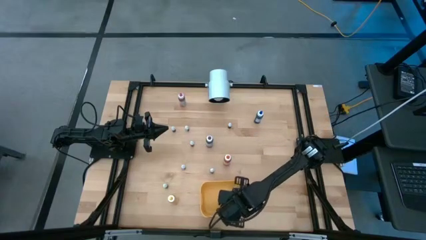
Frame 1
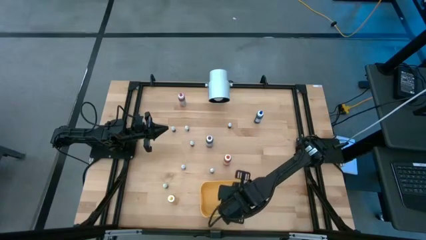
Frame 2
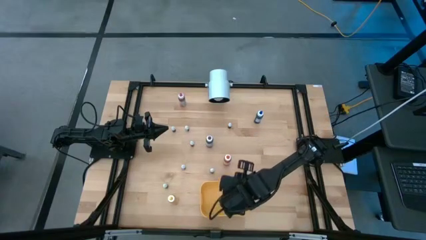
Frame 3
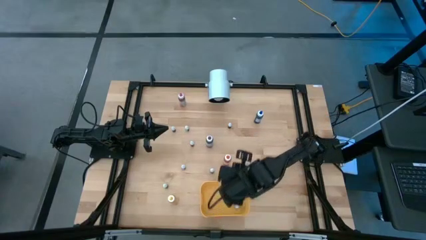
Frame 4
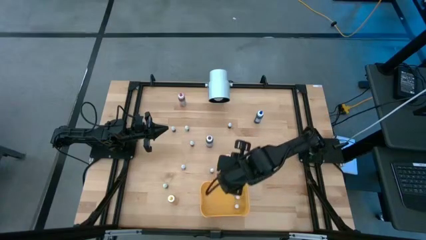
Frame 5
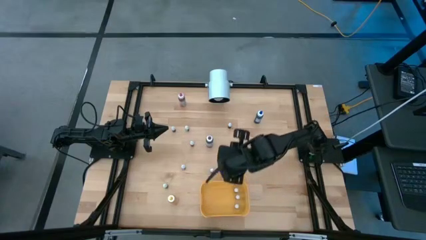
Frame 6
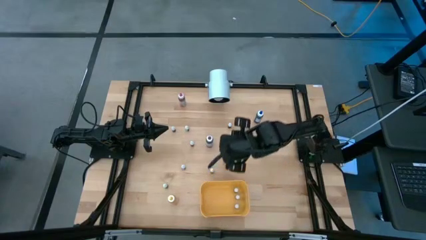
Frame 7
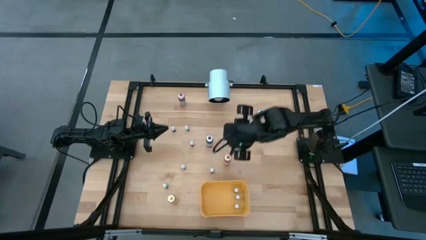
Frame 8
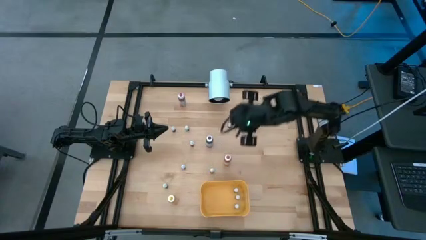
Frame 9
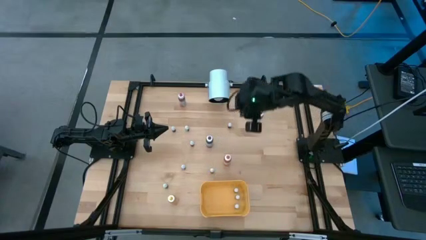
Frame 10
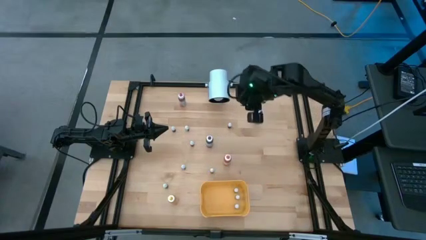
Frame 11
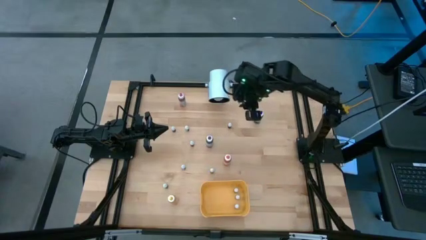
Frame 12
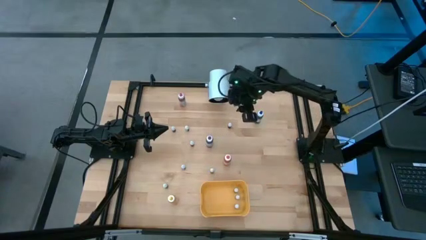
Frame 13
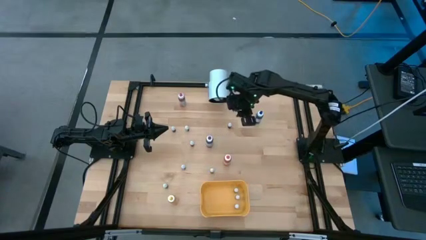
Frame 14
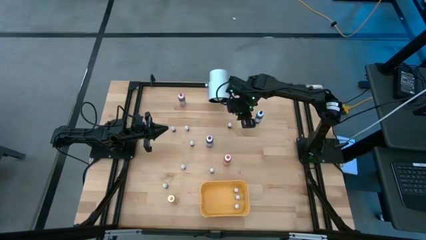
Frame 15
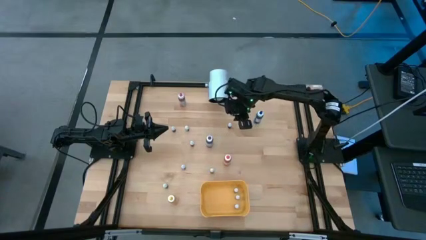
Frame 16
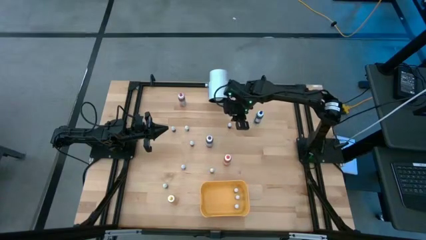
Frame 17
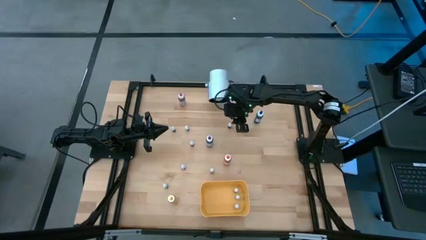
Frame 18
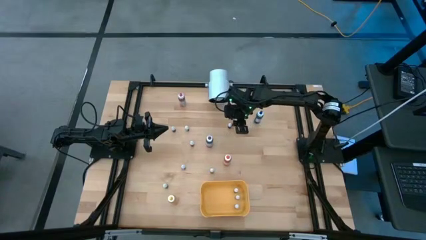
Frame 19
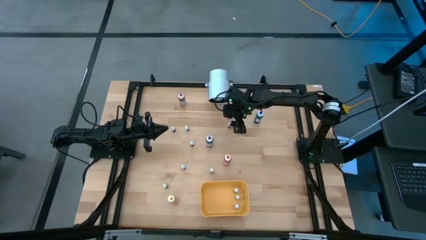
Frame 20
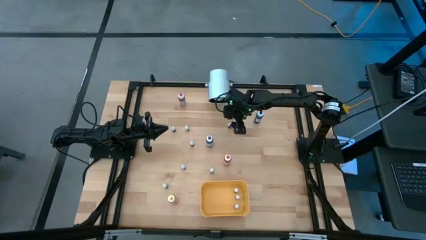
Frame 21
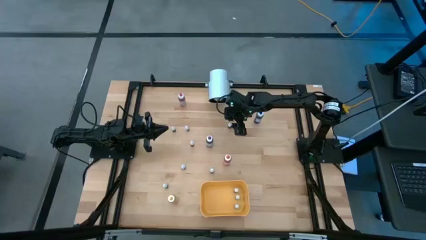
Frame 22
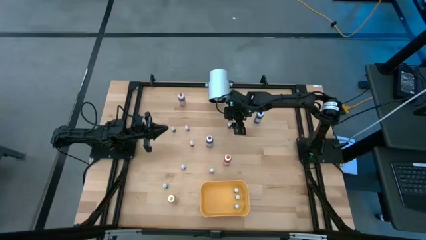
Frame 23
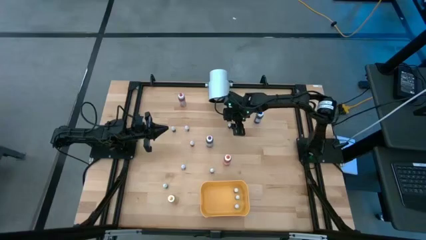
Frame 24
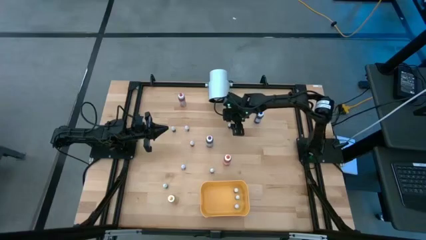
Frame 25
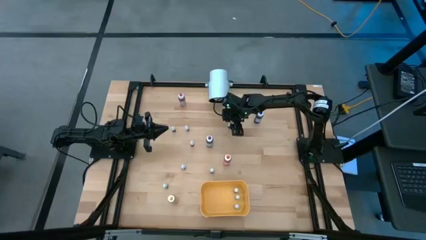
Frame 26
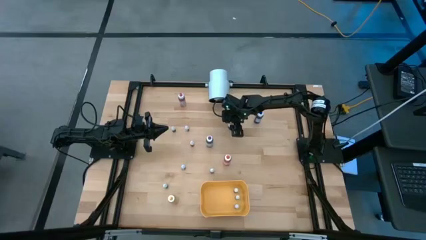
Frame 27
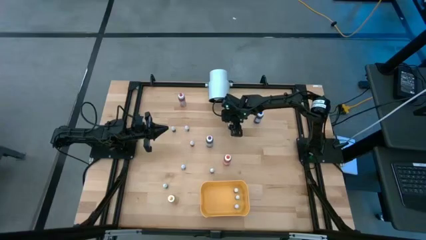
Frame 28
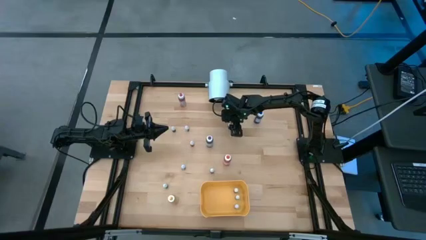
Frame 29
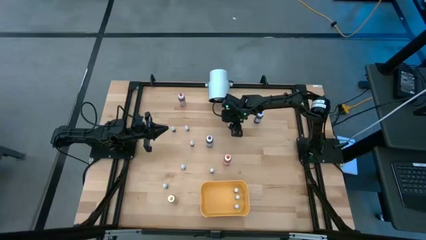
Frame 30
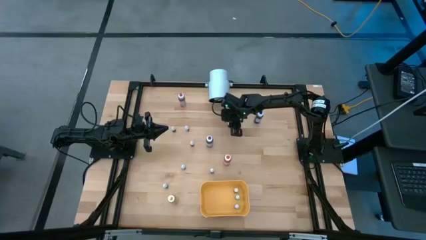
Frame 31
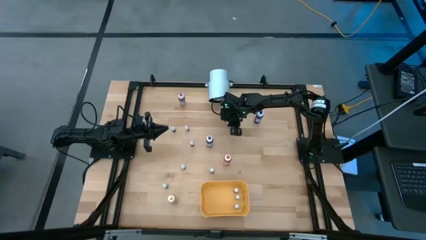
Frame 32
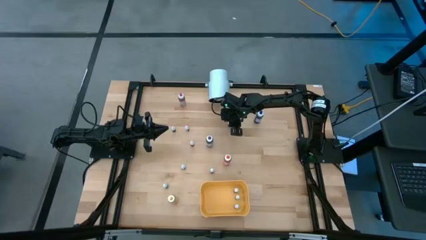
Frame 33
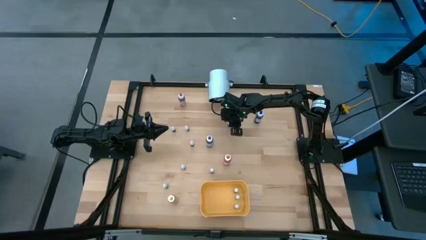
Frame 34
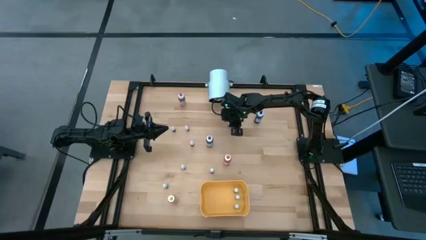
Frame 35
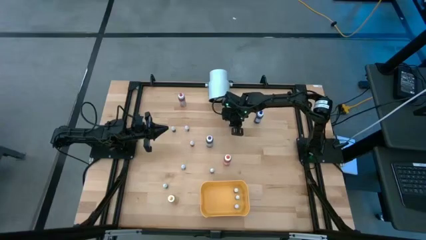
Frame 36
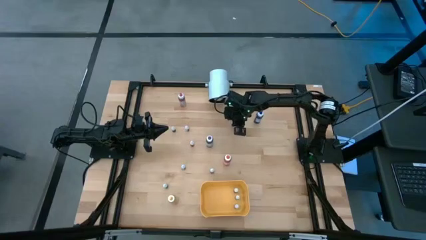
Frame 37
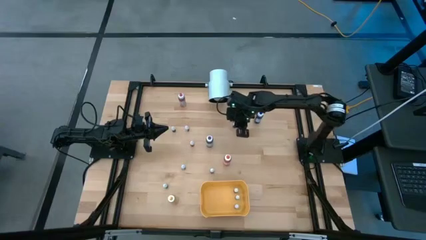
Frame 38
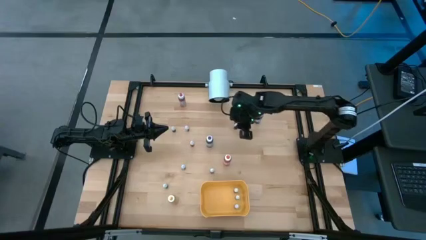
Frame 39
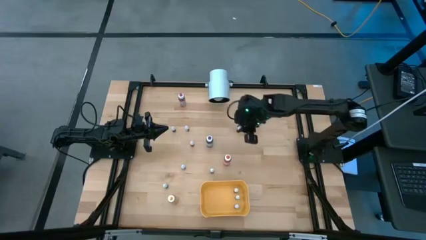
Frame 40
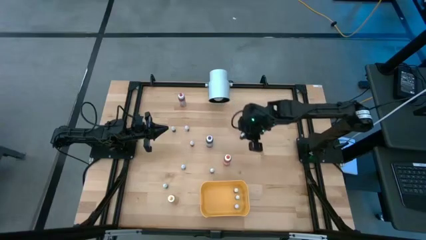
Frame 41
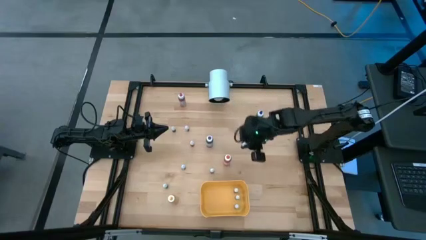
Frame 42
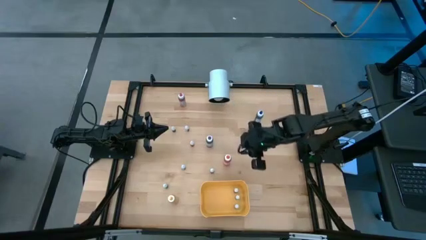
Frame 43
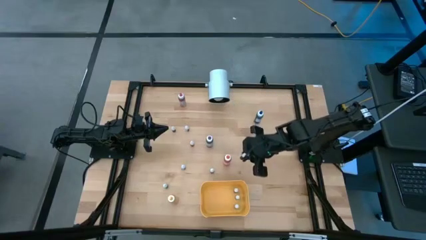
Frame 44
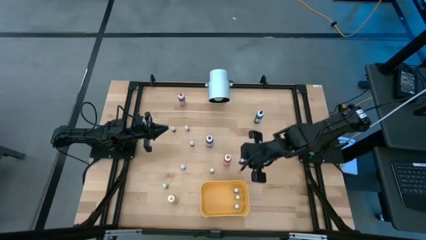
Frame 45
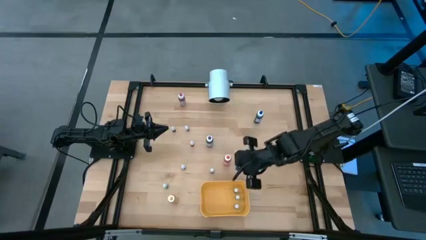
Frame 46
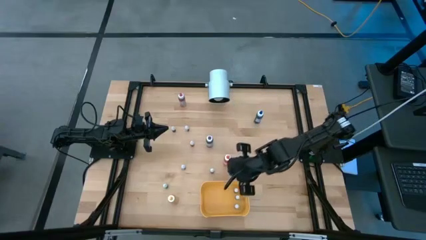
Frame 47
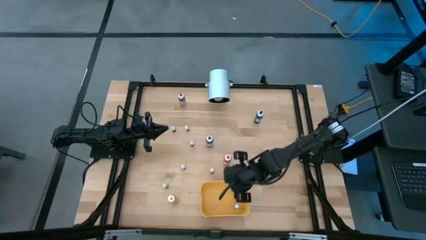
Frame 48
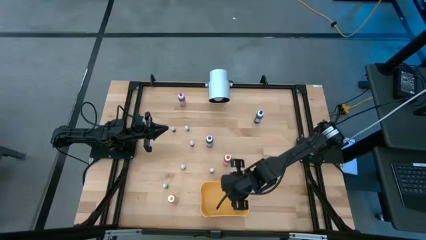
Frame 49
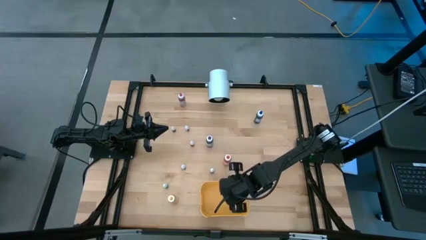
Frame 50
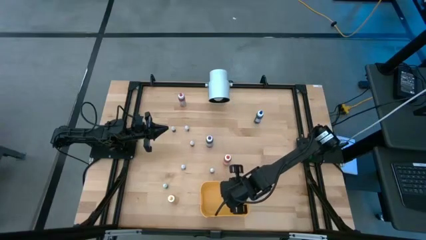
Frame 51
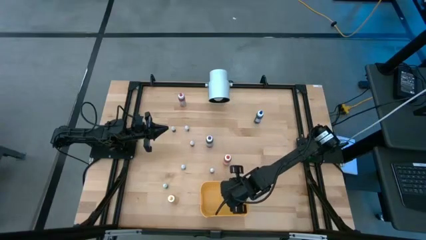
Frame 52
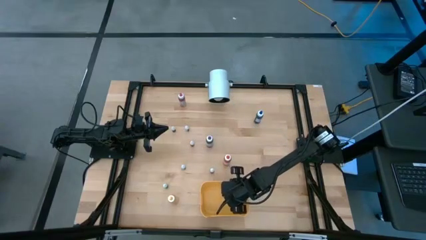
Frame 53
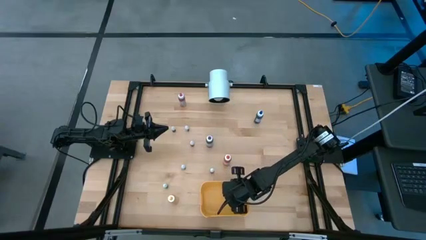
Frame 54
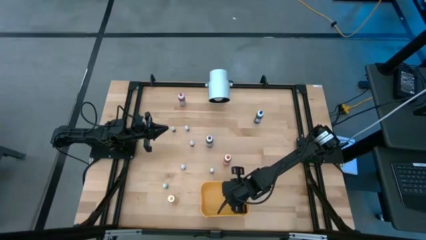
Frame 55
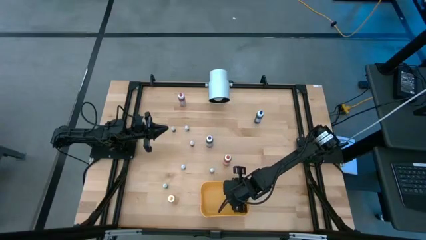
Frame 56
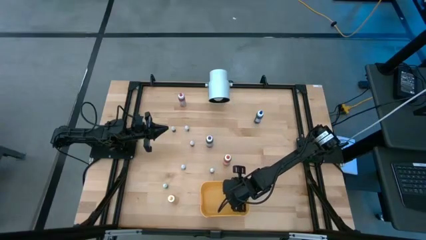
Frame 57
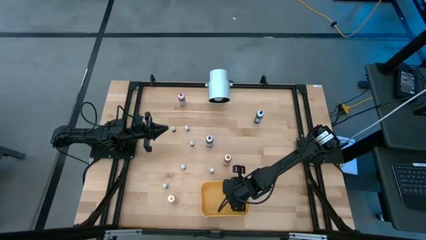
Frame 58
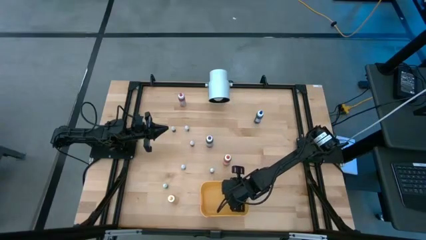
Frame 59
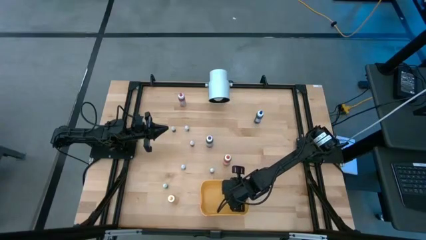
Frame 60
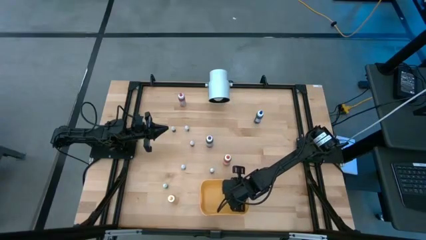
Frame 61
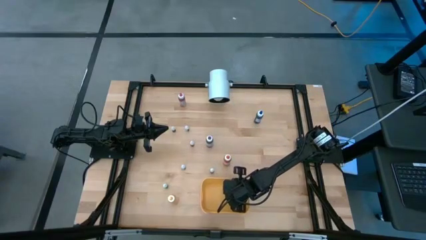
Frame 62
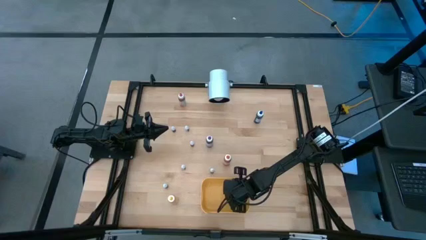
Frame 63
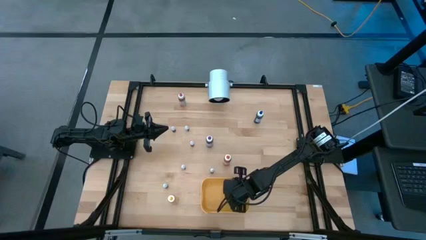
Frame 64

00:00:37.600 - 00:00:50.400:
Task: Pick & Place food coloring
Put the top small black food coloring bottle into the yellow container
